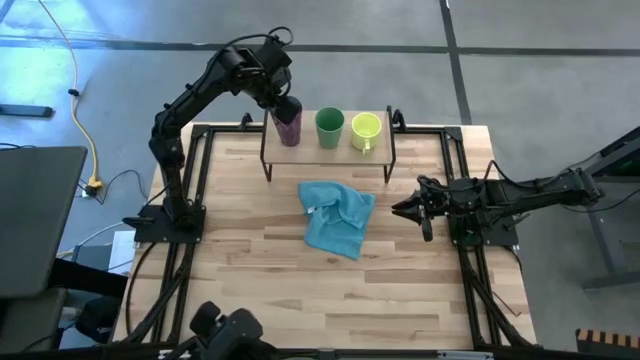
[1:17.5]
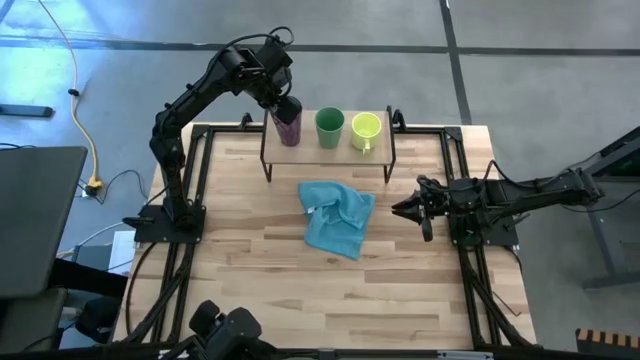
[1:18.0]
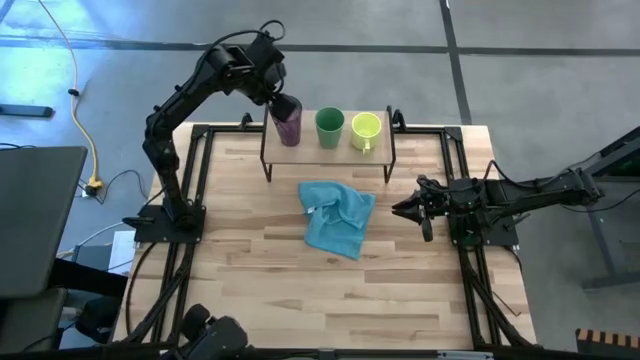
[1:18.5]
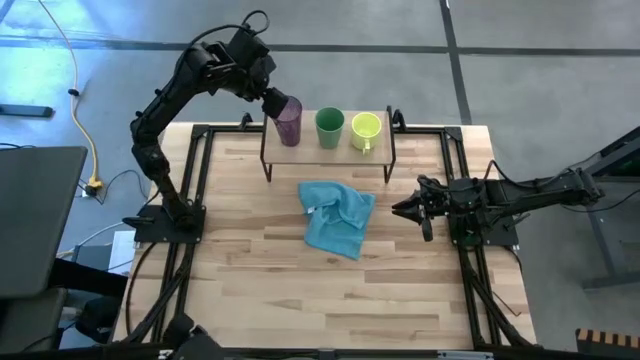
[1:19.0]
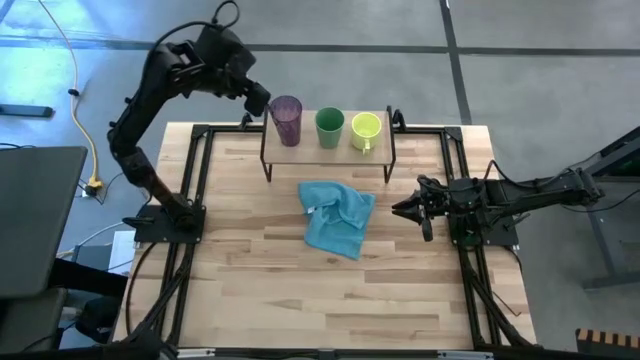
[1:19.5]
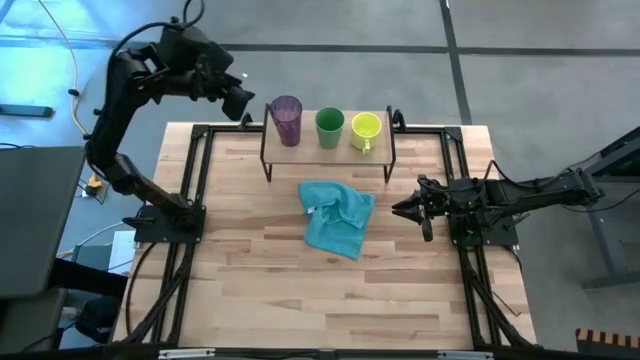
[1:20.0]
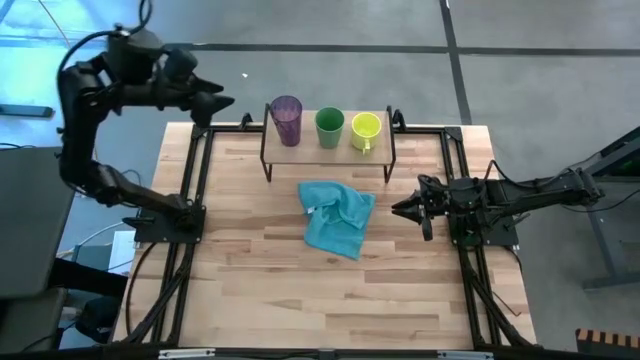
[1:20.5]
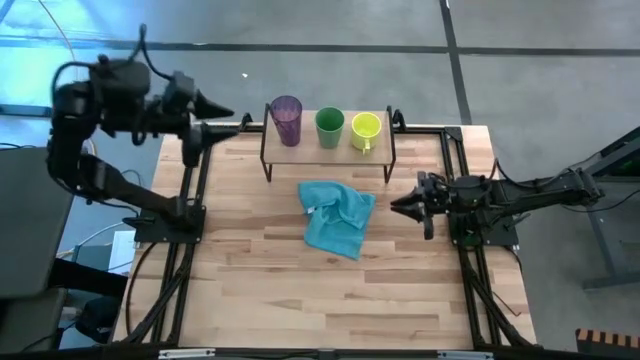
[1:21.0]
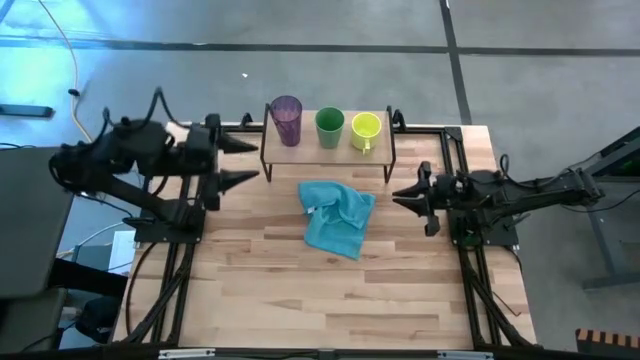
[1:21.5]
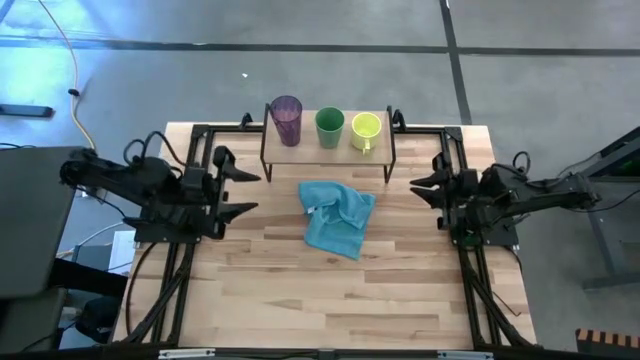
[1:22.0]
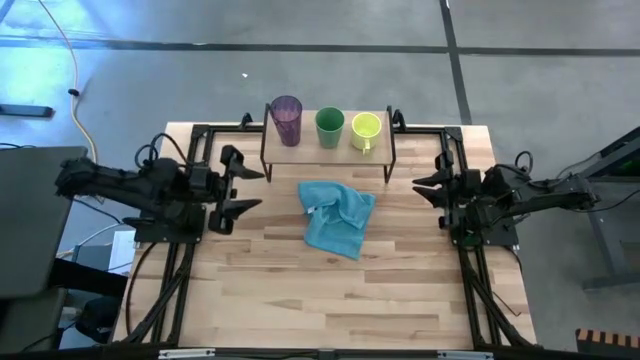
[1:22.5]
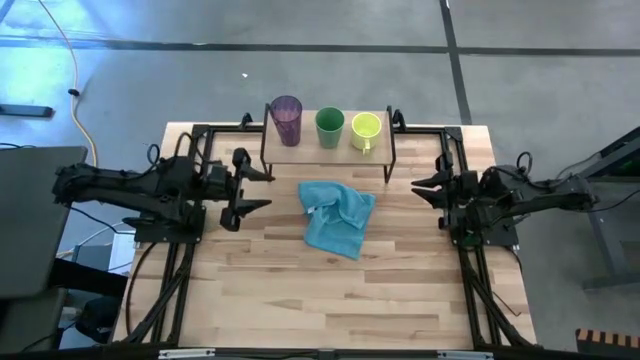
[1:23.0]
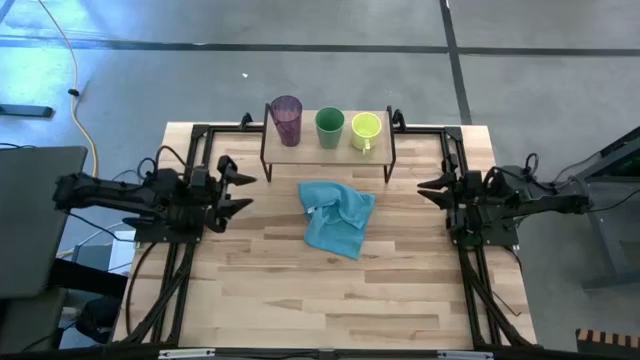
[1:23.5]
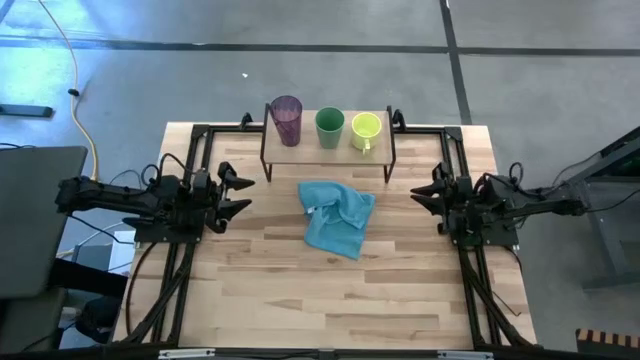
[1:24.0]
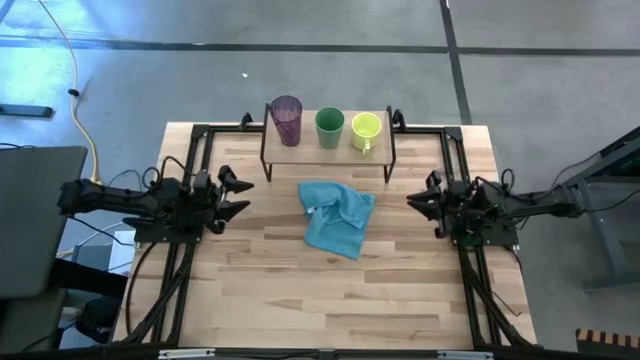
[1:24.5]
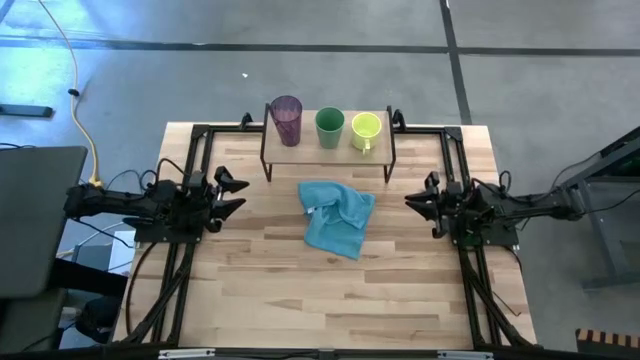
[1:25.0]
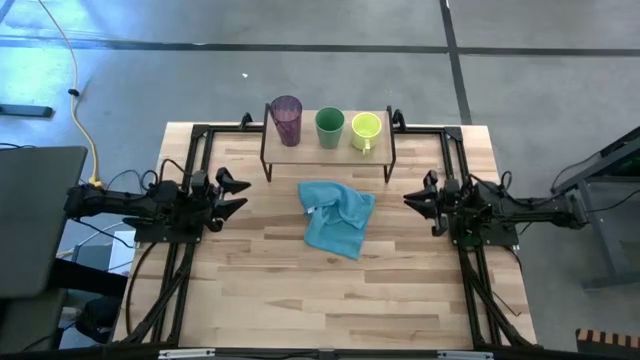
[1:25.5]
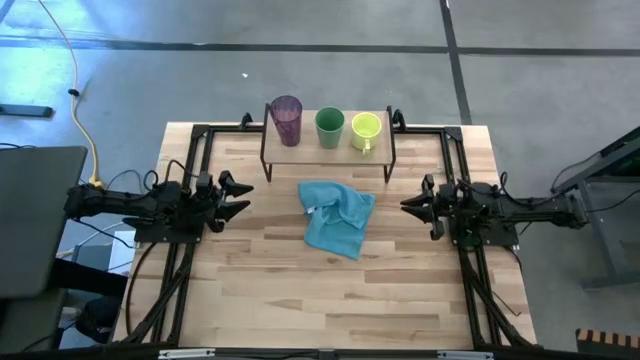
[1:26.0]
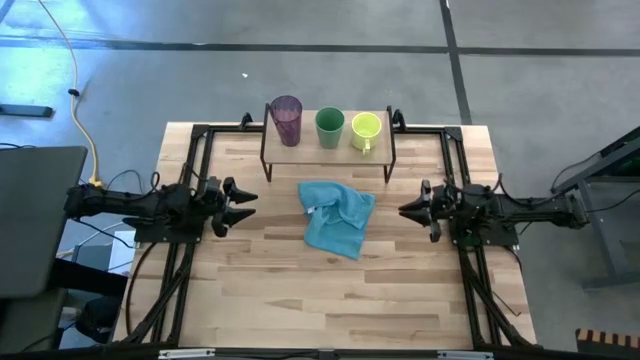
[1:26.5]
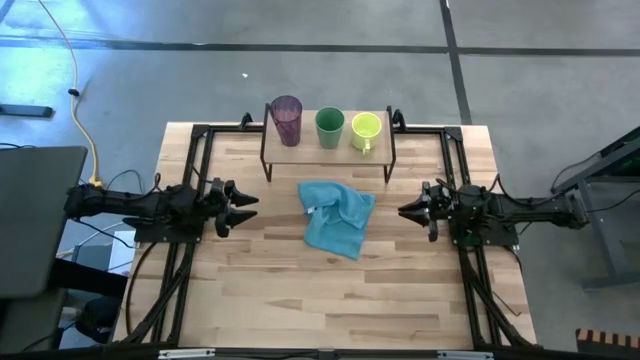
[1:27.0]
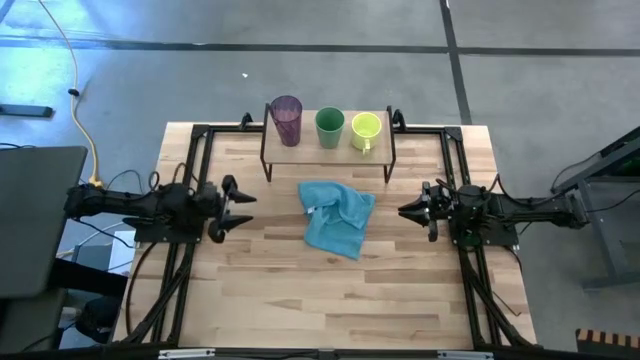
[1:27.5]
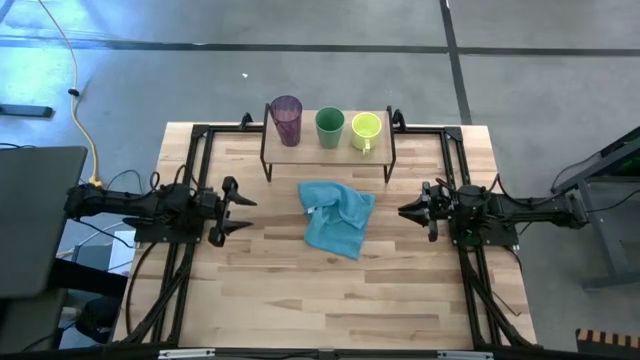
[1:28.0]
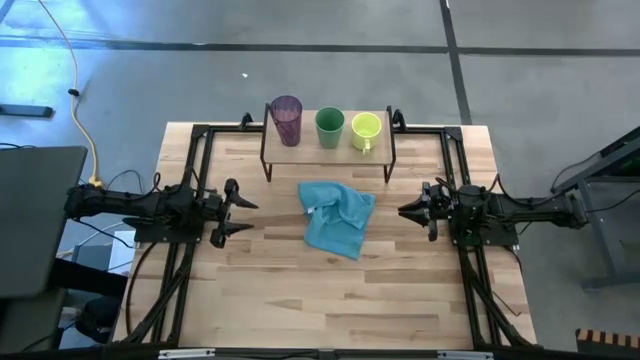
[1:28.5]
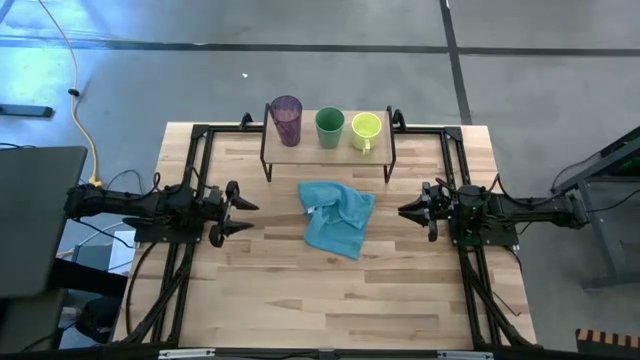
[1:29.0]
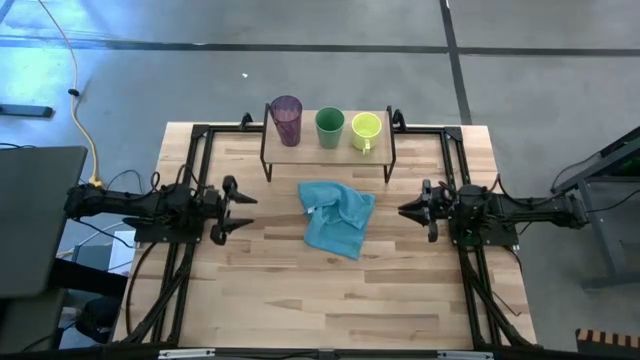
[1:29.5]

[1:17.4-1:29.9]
Task: Stack small to large cups/mugs on shelf
Return to Home Position

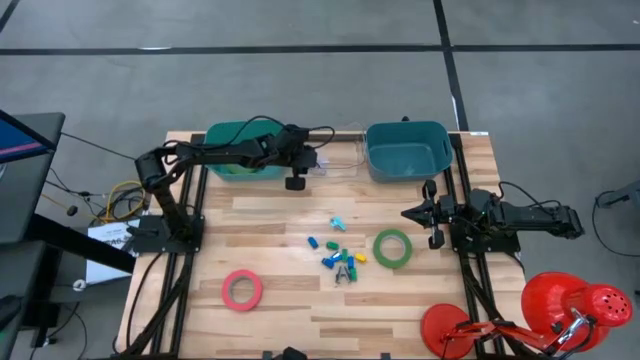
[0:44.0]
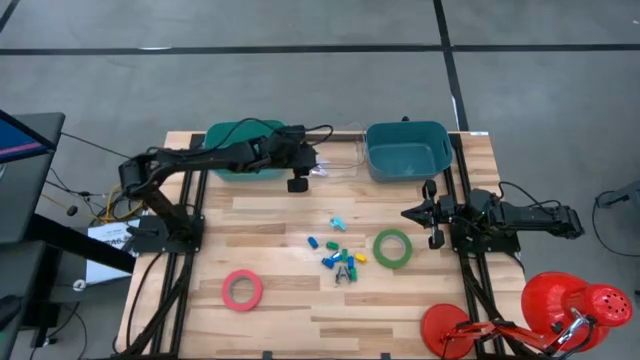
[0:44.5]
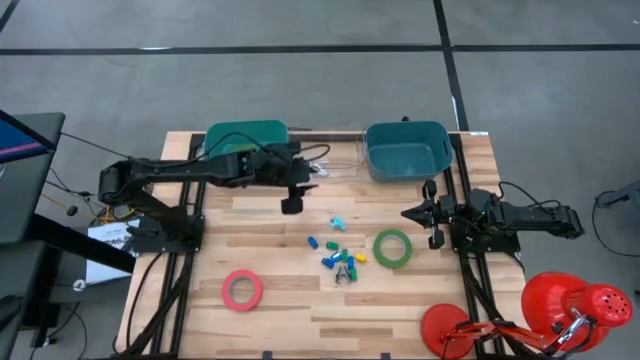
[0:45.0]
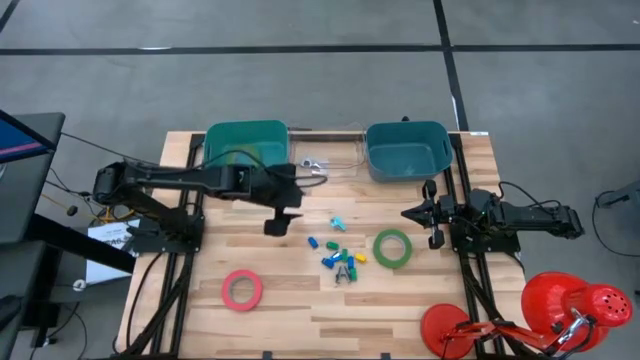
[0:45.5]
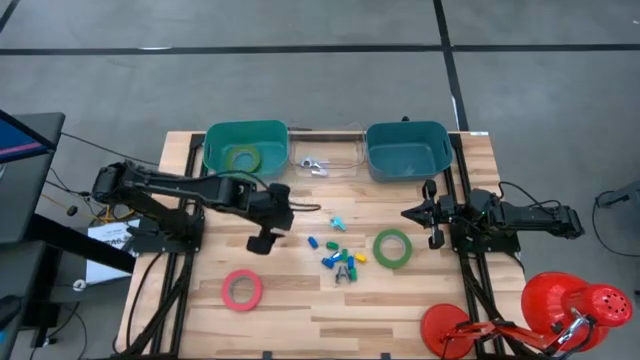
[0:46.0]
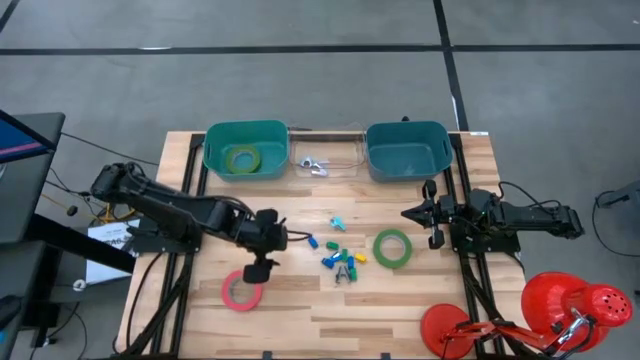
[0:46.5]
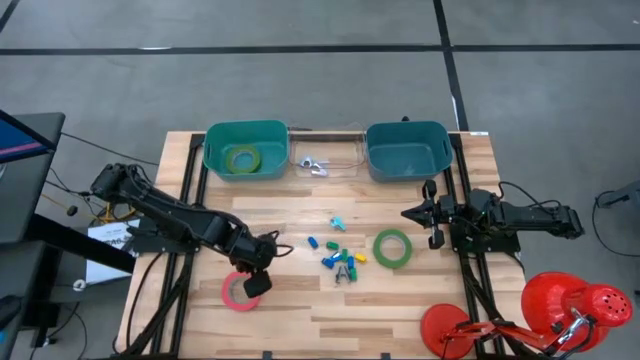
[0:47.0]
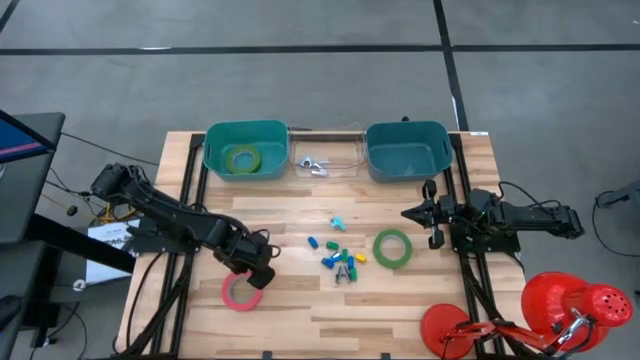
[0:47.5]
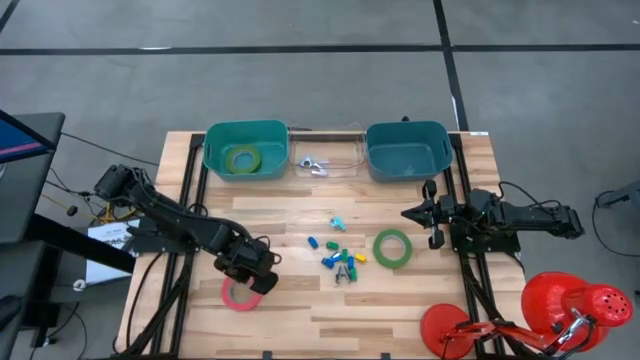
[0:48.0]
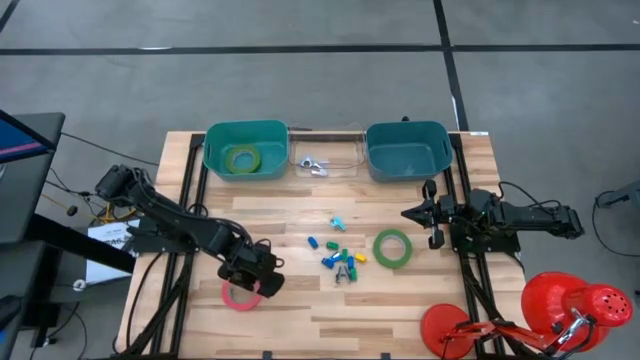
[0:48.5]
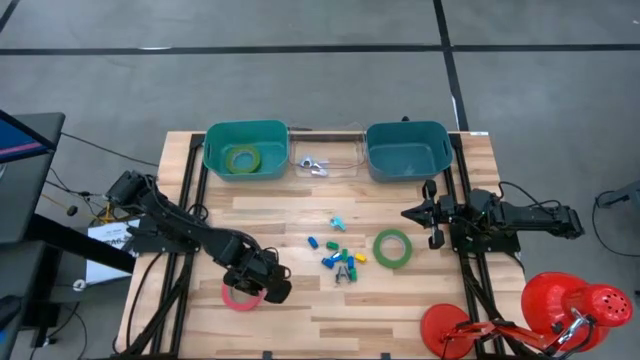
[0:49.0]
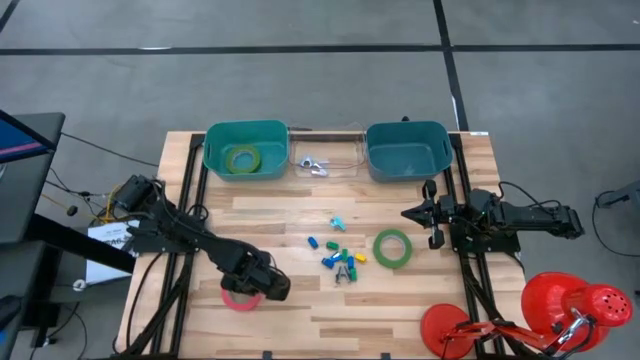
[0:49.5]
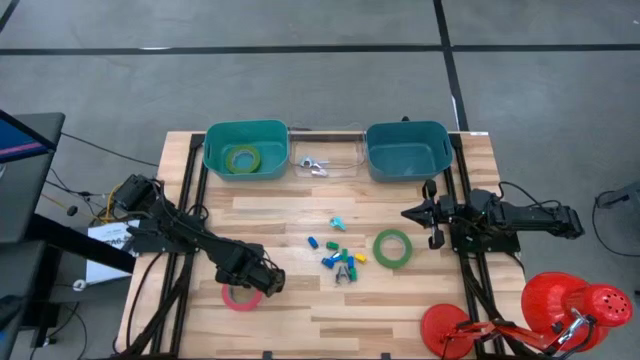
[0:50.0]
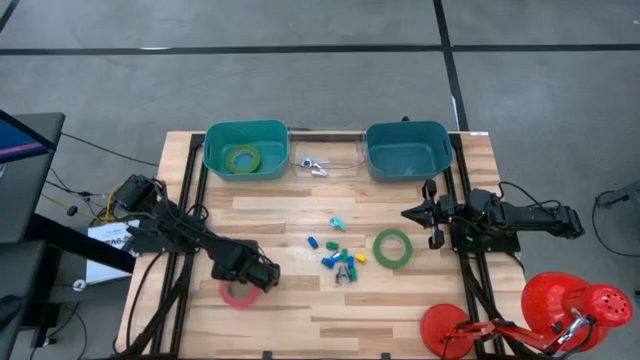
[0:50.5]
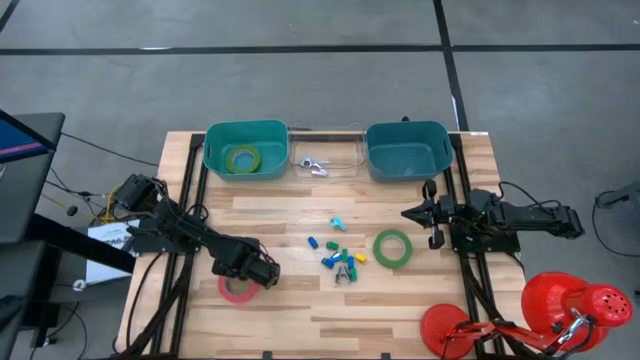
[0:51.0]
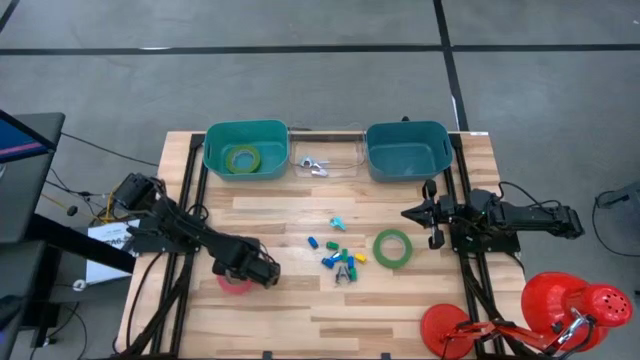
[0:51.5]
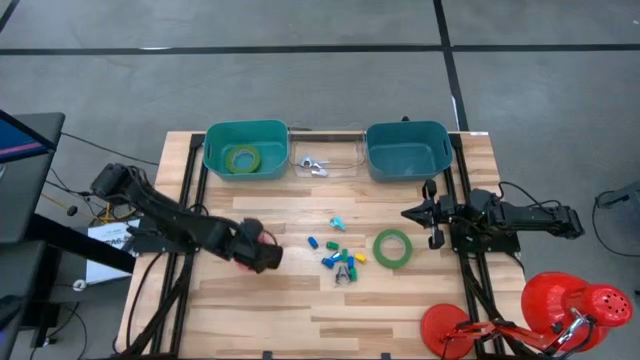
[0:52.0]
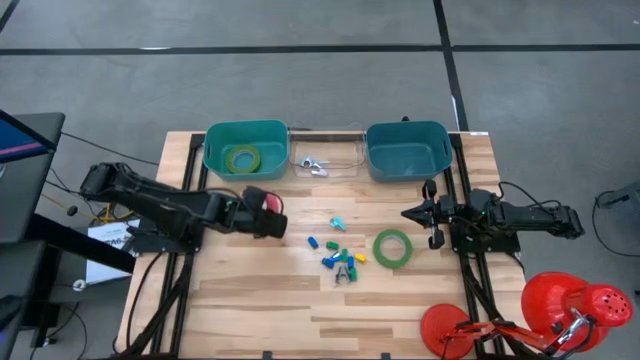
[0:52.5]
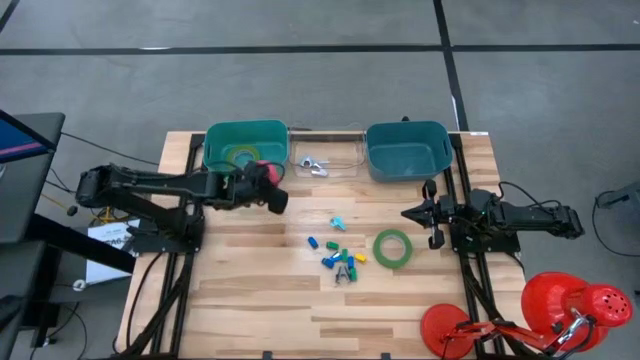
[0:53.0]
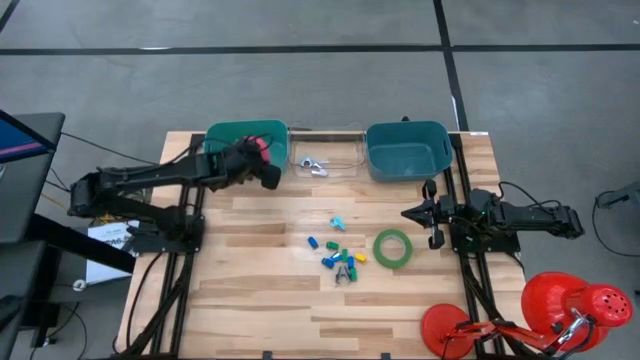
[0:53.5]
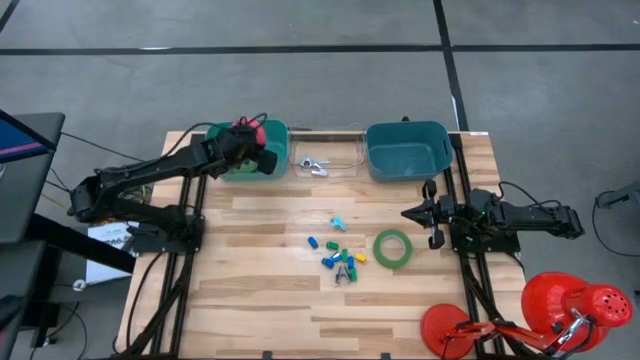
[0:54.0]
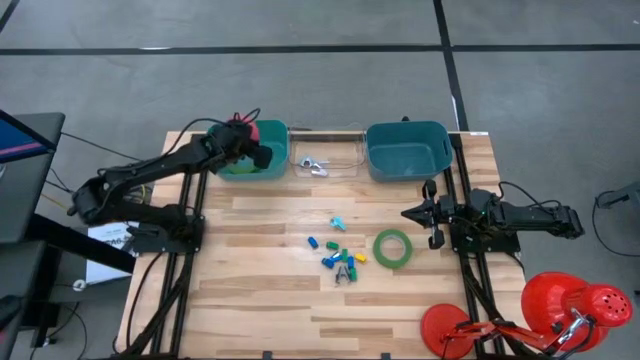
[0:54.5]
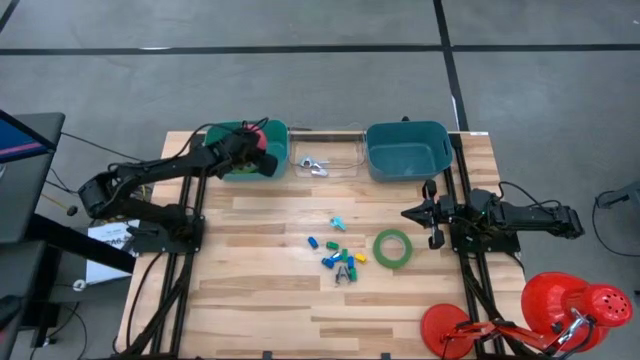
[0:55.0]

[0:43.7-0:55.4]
Task: Pick and place Stapler, Stapler remover, tape
Put the pink tape into the green bin
